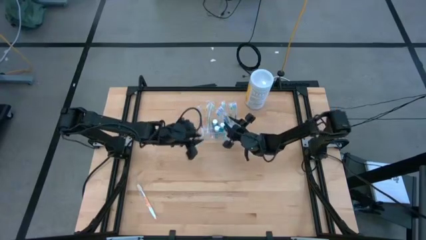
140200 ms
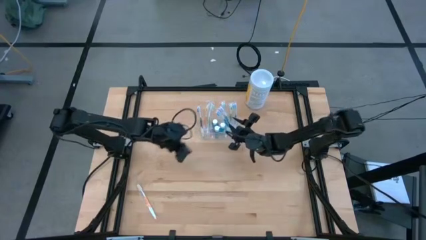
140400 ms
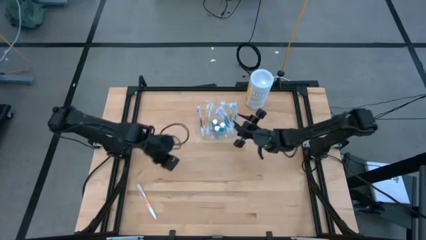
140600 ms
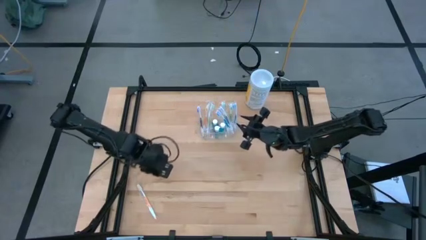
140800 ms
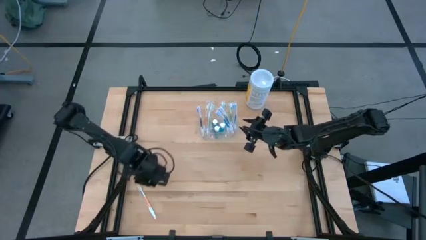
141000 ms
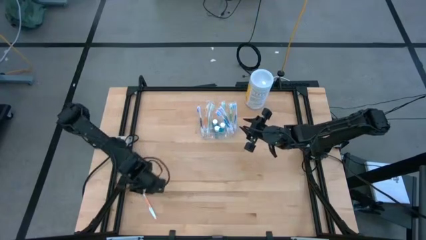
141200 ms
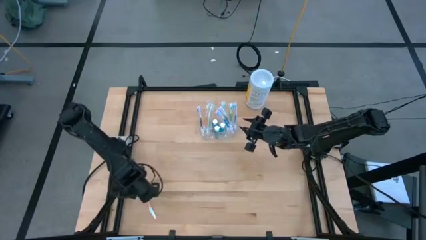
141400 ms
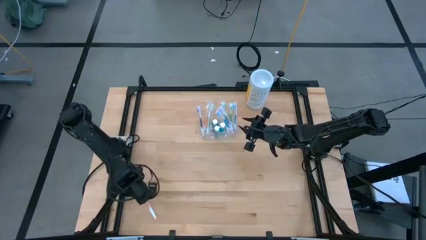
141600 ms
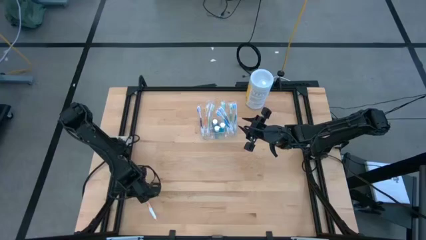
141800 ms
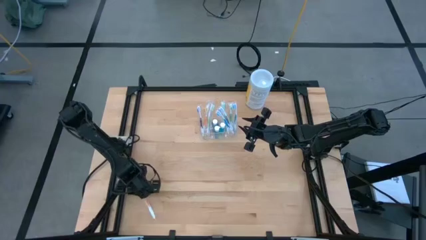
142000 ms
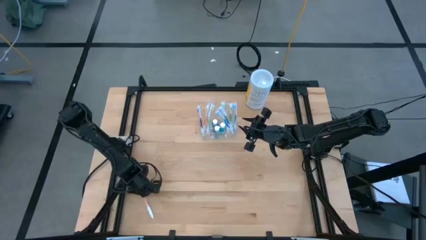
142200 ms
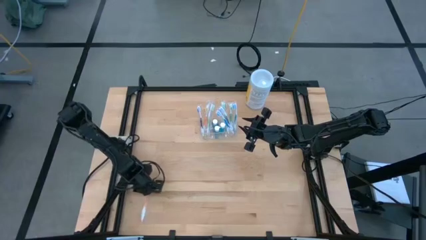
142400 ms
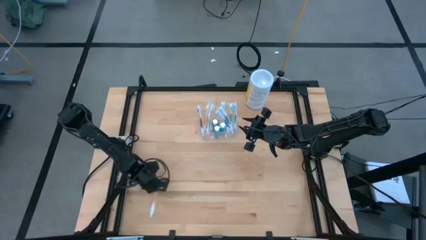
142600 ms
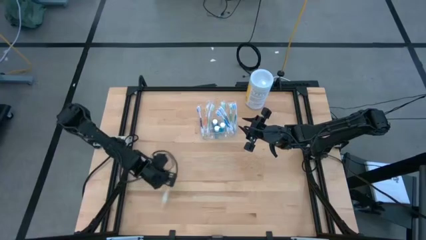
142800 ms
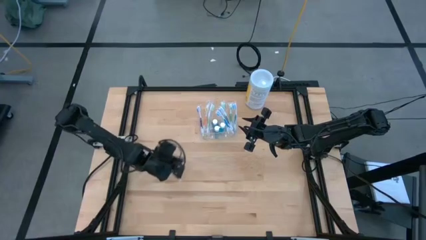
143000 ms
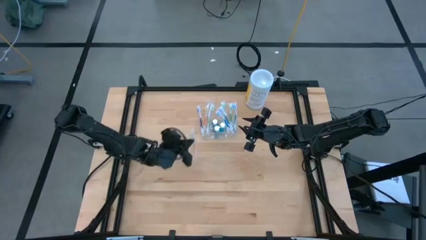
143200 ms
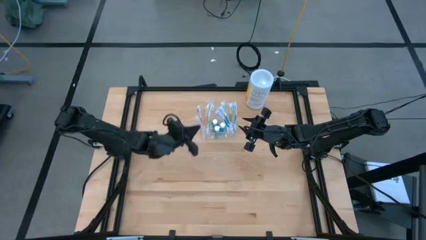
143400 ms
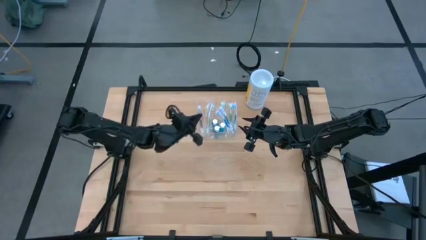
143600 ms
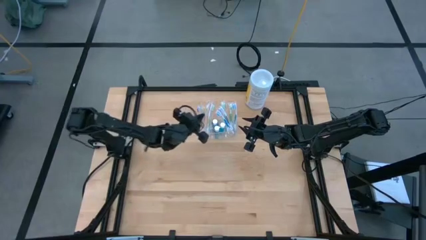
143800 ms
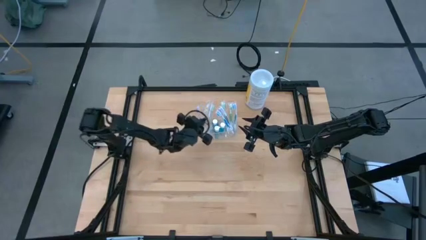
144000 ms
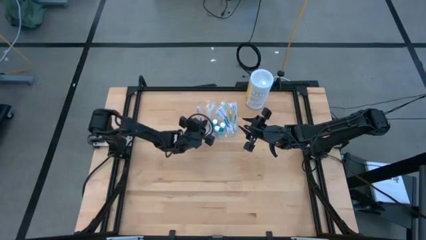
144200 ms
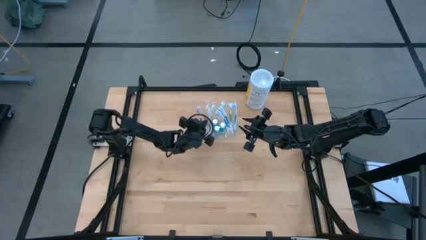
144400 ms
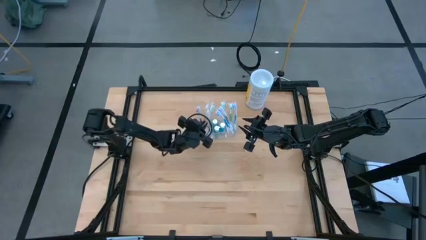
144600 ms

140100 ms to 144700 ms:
Task: Pick & Place toothbrushing station
Put the orange toothbrush into transparent organizer

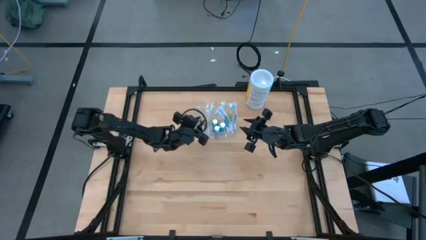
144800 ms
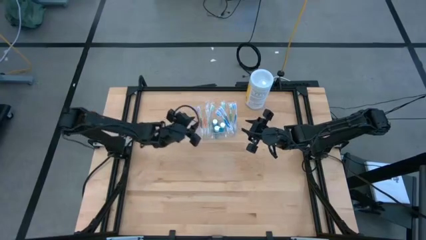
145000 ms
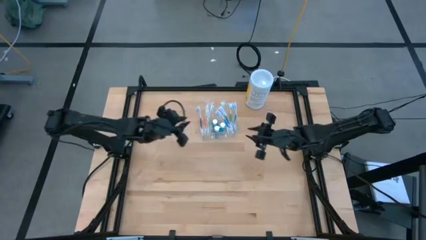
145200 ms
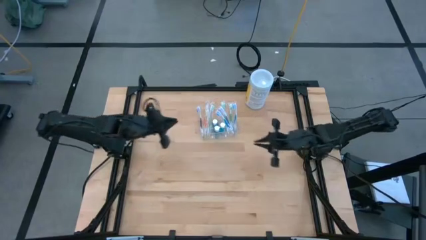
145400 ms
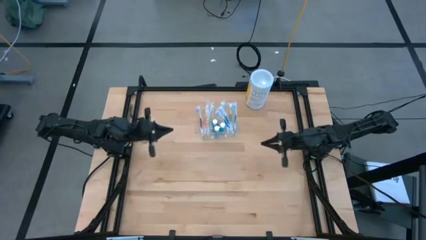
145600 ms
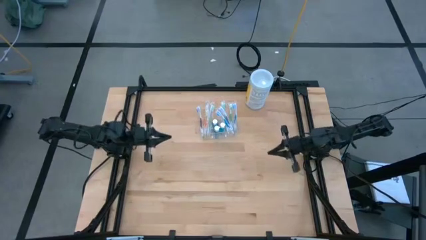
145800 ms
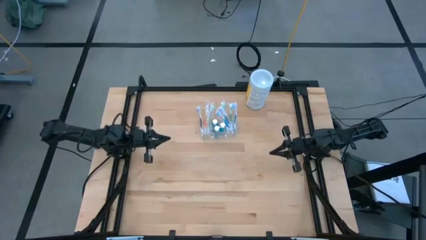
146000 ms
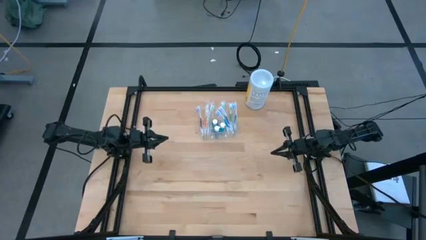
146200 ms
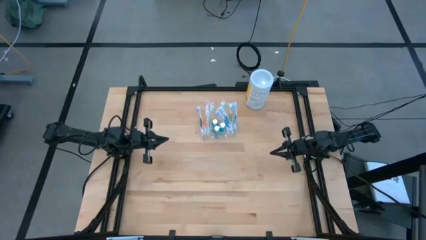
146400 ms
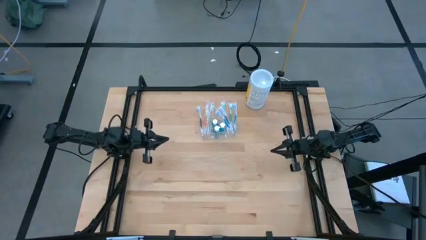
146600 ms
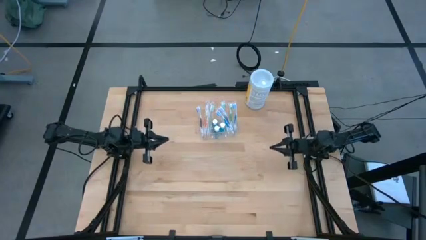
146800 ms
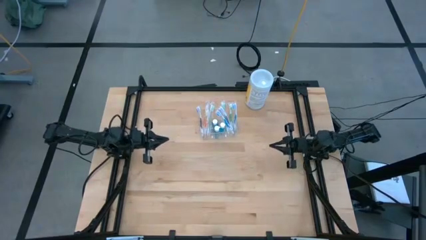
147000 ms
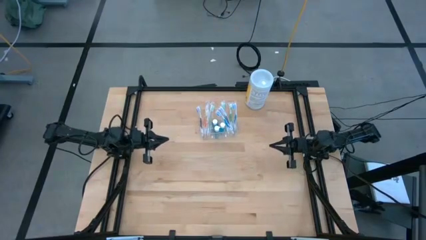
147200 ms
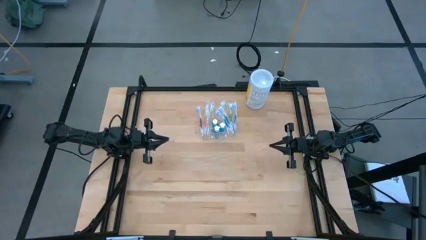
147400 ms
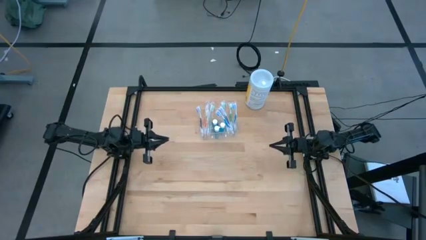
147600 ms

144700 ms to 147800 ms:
Return to Home Position

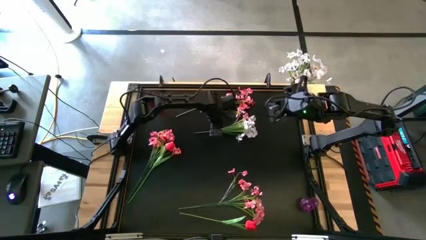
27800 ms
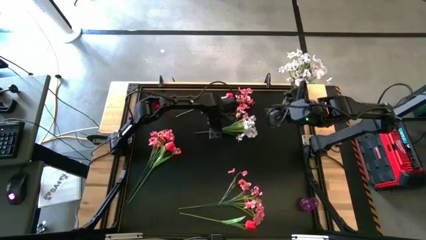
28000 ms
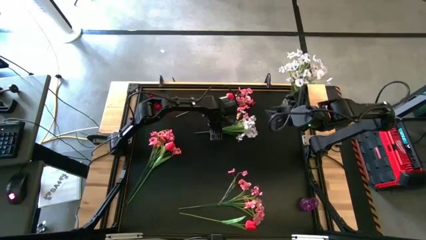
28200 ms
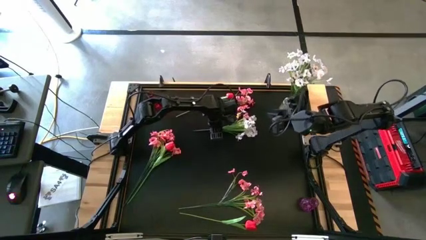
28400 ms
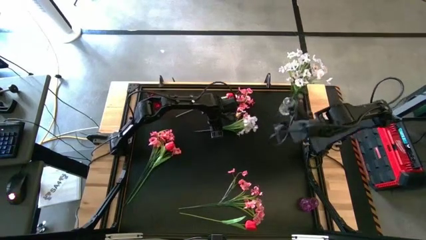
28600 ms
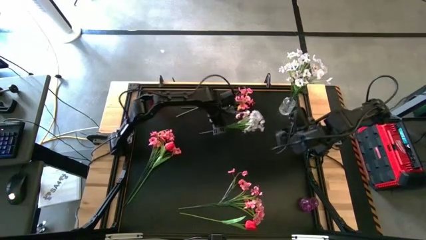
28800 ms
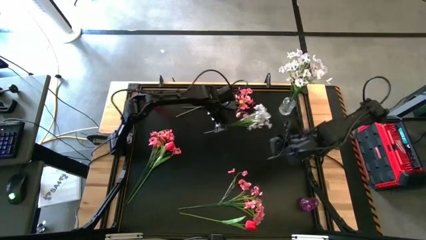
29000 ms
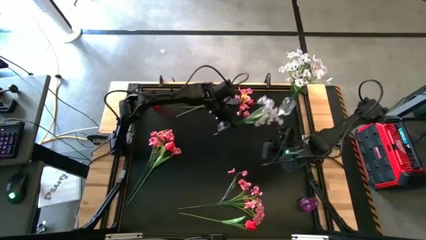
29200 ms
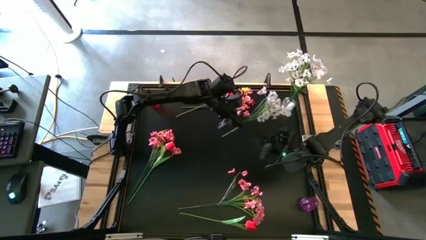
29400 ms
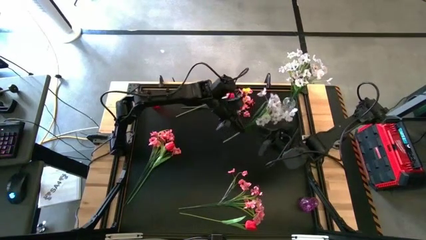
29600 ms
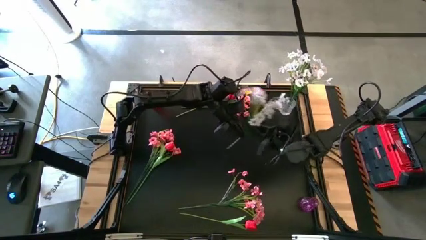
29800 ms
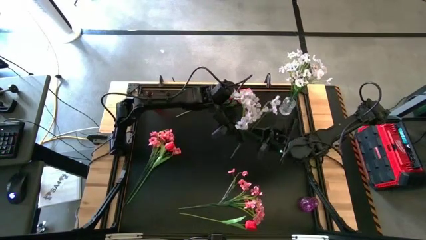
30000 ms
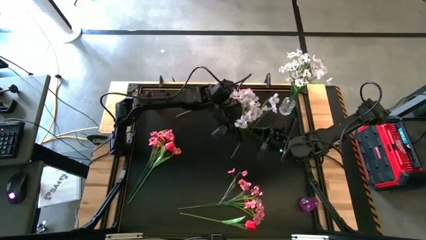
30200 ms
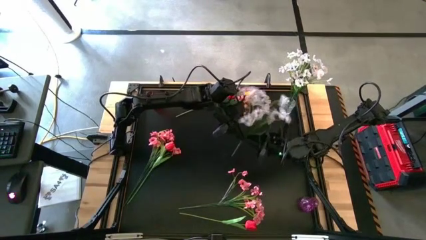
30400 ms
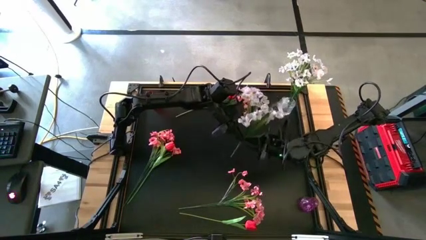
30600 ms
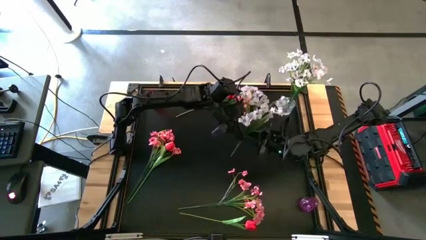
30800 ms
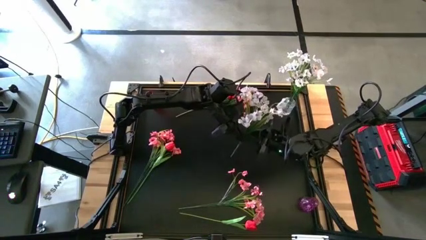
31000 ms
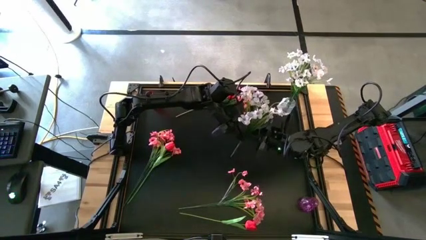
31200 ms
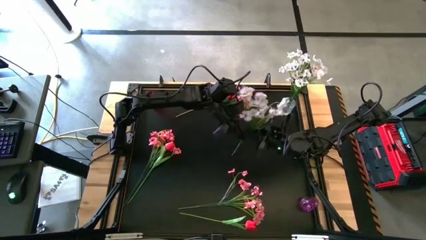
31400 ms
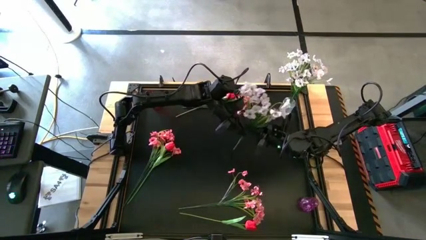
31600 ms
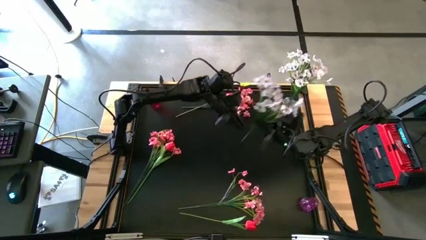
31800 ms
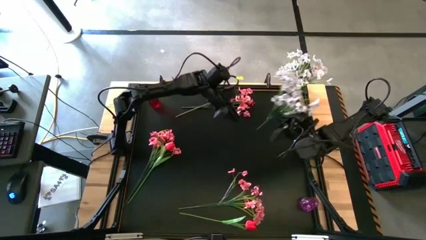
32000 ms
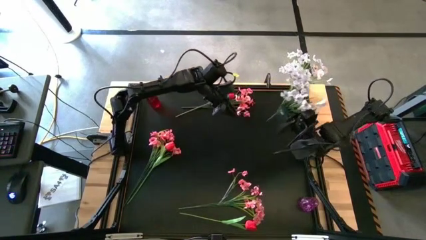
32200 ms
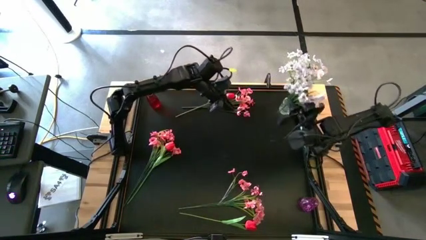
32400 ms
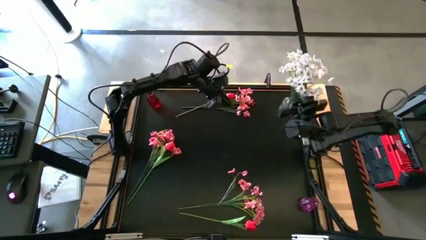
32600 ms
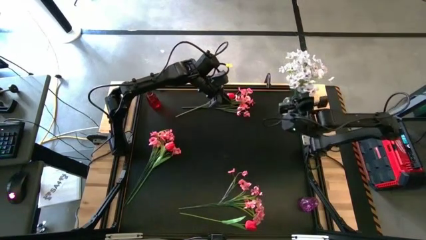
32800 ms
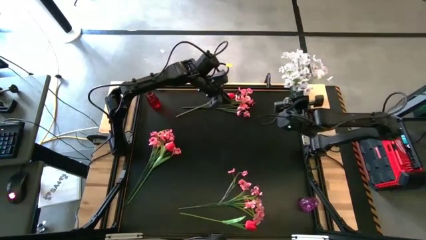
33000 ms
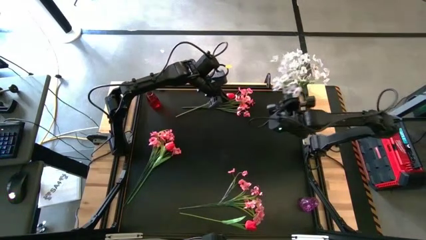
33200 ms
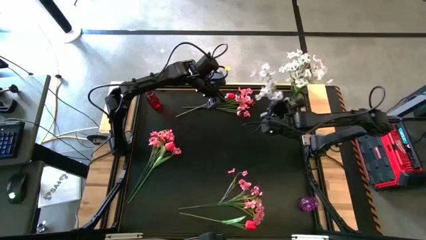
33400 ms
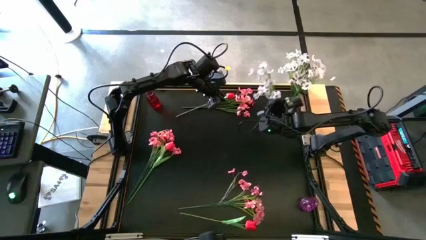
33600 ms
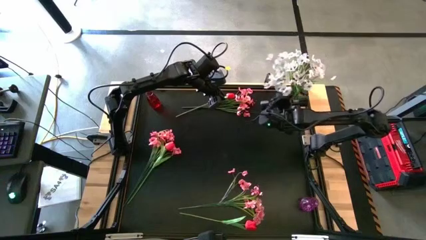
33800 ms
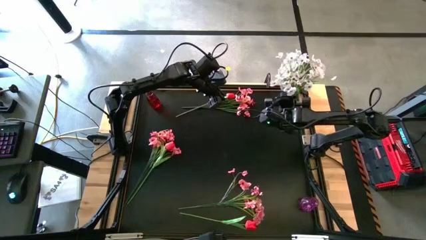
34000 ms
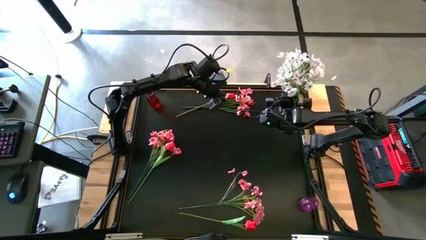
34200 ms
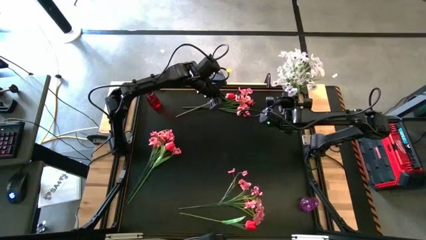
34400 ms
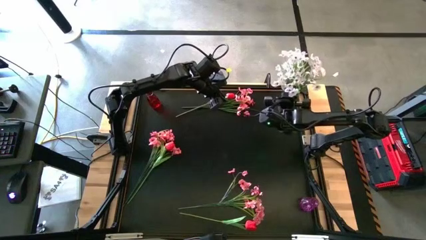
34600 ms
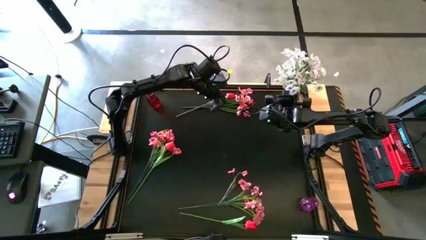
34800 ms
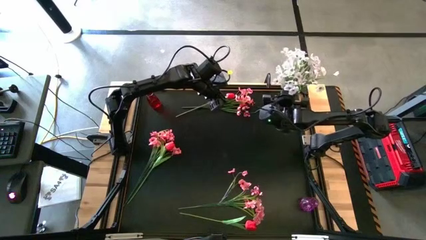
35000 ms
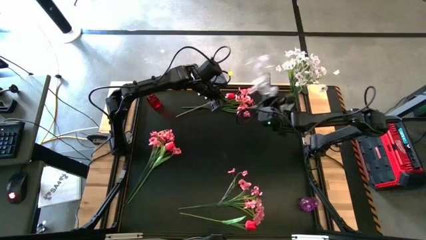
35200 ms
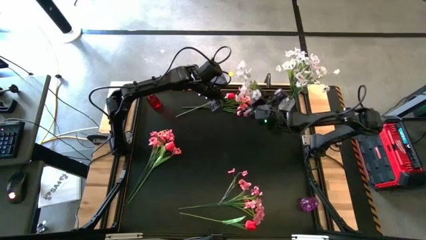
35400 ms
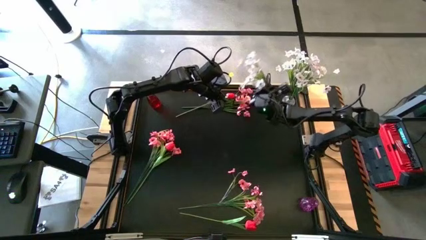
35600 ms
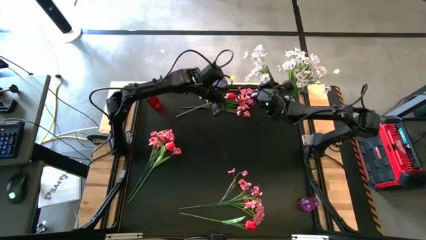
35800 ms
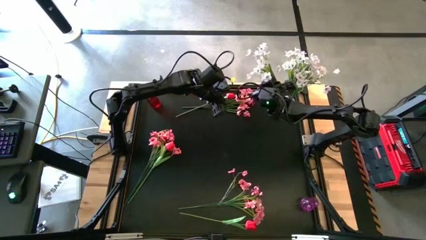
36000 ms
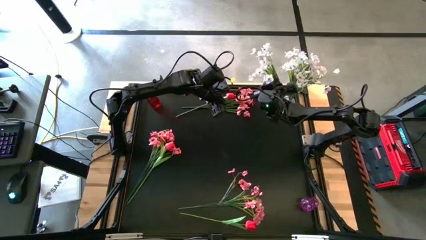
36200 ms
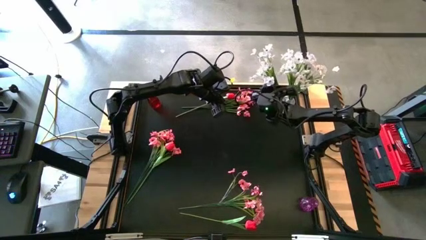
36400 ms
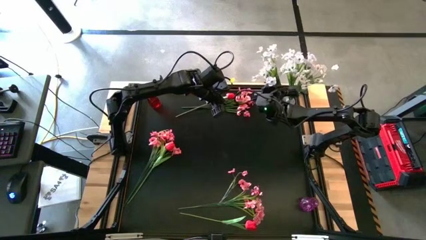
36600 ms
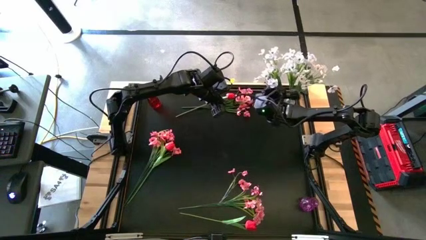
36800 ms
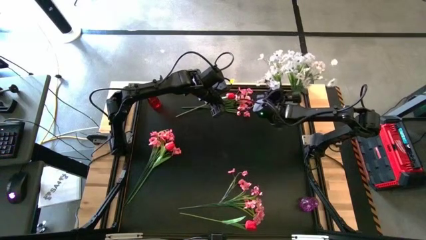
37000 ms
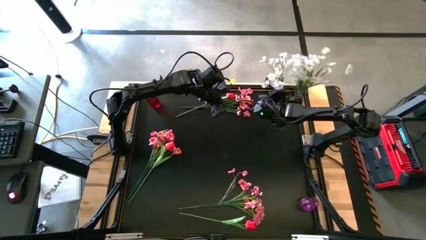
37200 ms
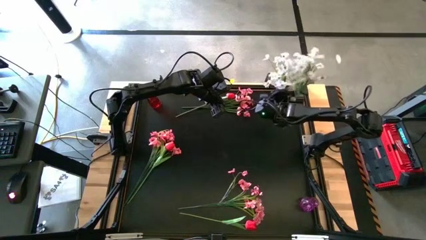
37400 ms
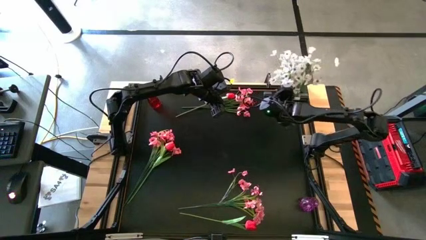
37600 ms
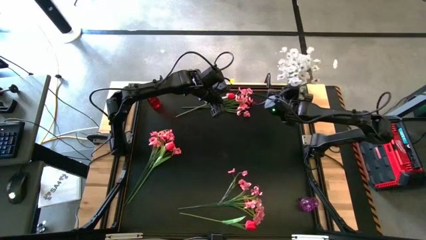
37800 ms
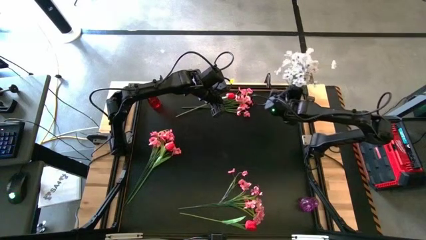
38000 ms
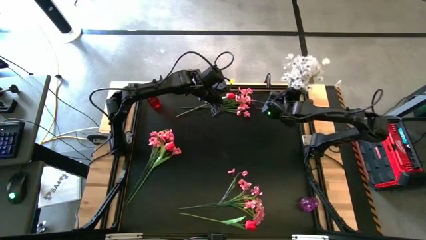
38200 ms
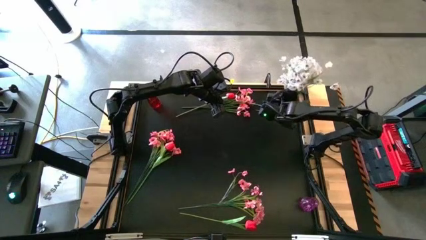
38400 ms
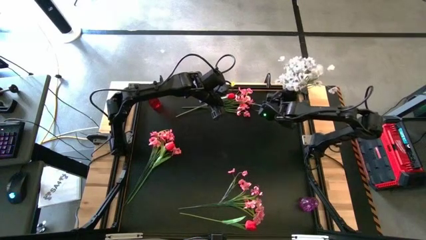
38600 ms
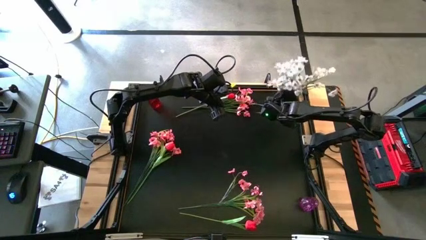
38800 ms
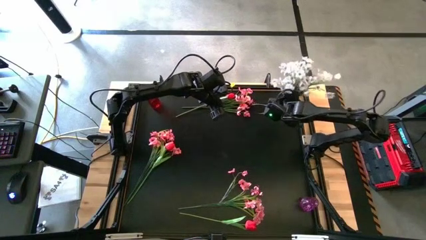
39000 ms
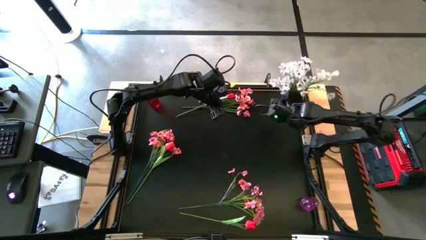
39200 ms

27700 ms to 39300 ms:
Task: Sort flowers into vase by color
Put the white flowers into the transparent flower vase
